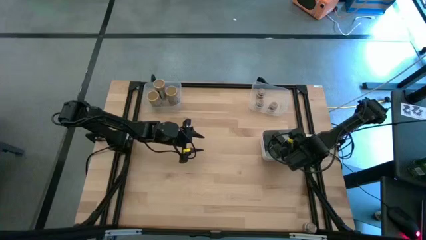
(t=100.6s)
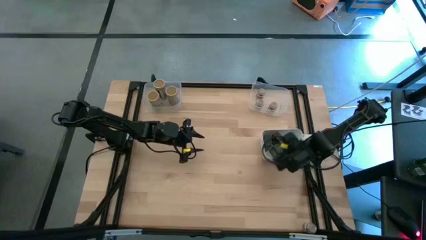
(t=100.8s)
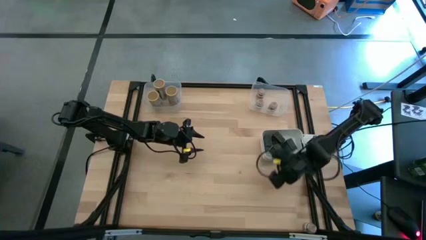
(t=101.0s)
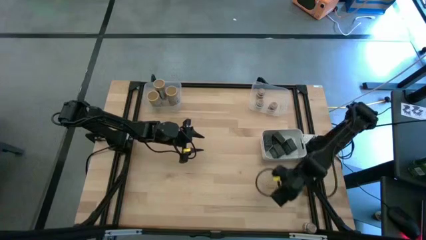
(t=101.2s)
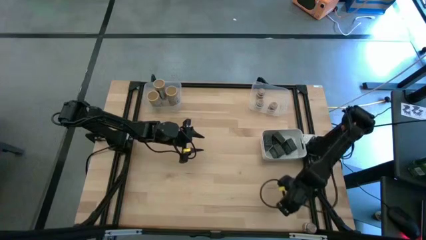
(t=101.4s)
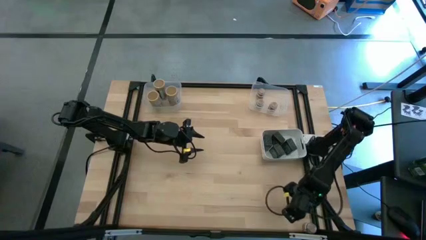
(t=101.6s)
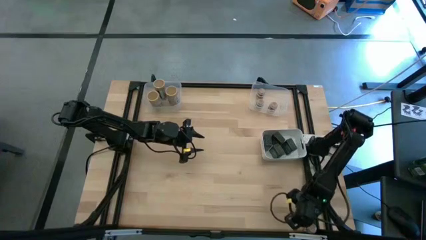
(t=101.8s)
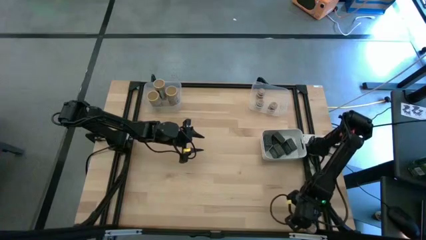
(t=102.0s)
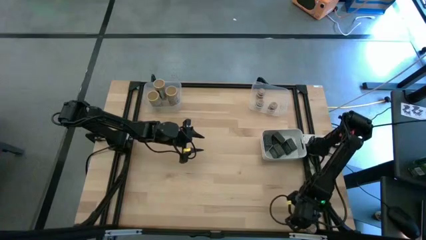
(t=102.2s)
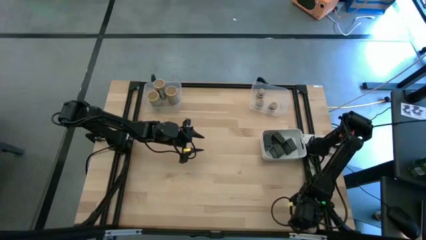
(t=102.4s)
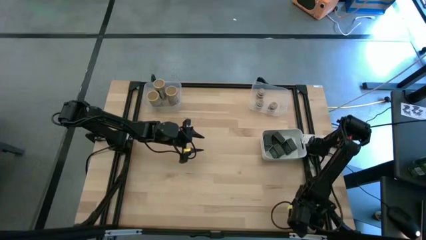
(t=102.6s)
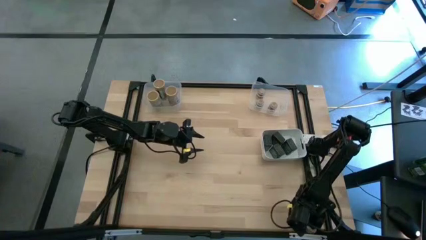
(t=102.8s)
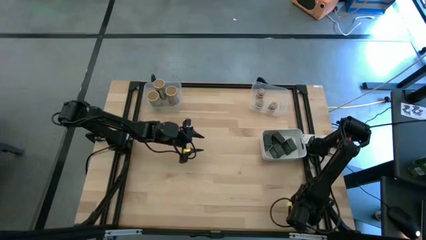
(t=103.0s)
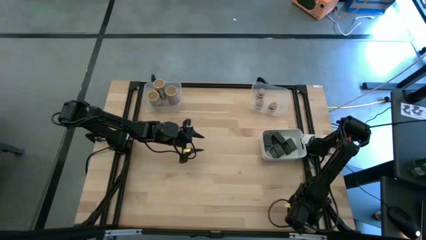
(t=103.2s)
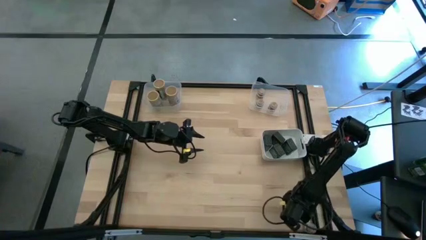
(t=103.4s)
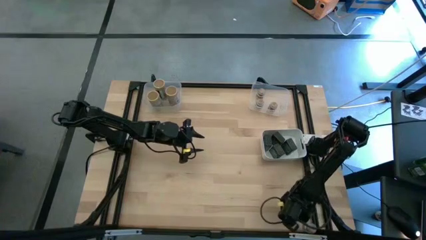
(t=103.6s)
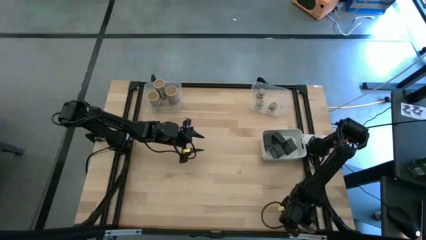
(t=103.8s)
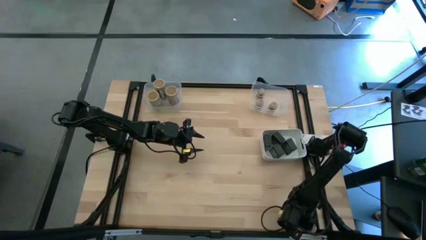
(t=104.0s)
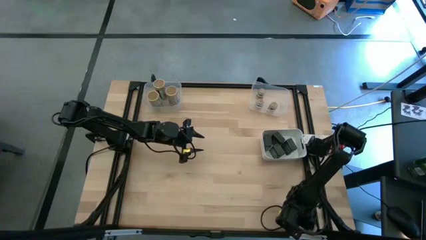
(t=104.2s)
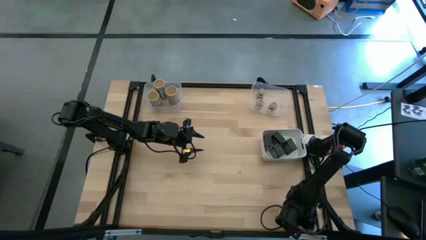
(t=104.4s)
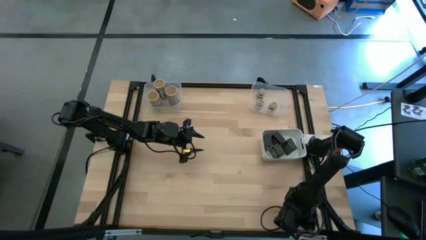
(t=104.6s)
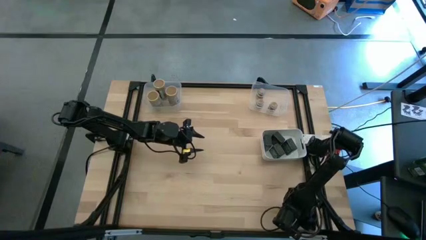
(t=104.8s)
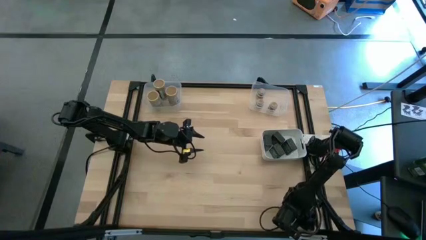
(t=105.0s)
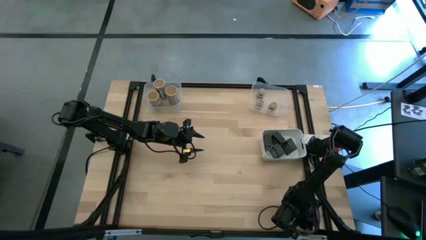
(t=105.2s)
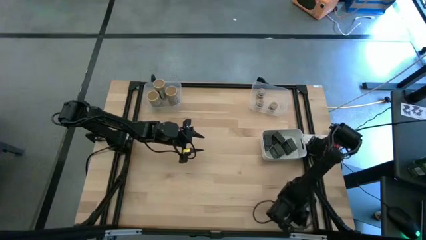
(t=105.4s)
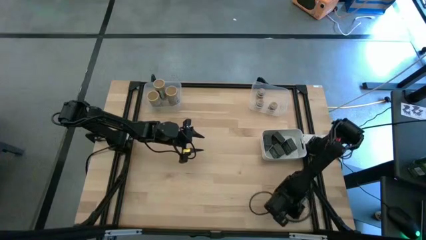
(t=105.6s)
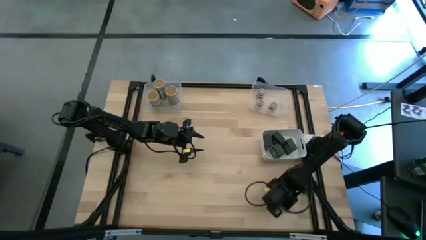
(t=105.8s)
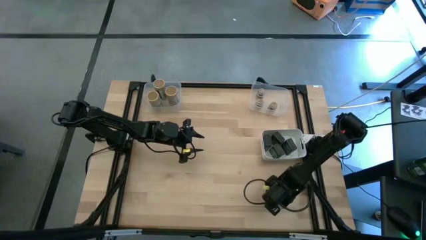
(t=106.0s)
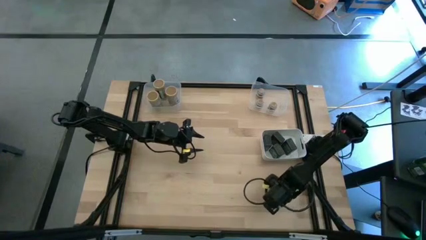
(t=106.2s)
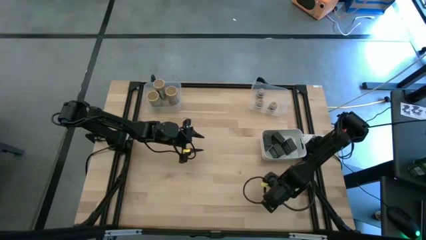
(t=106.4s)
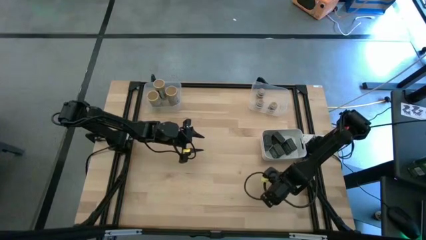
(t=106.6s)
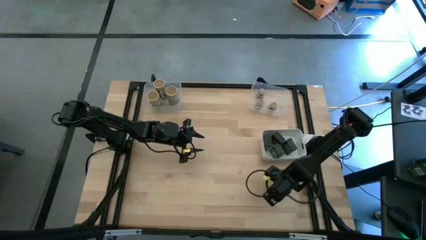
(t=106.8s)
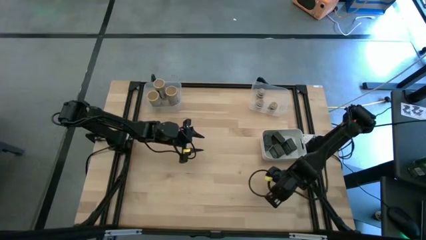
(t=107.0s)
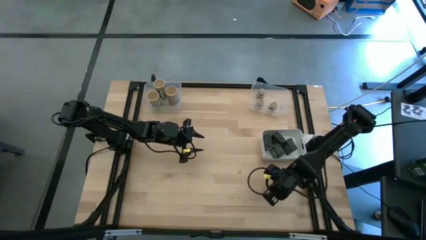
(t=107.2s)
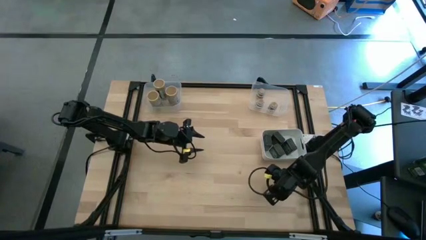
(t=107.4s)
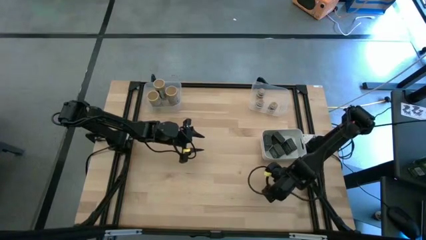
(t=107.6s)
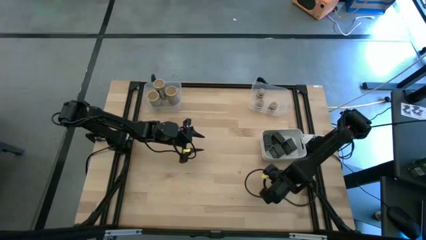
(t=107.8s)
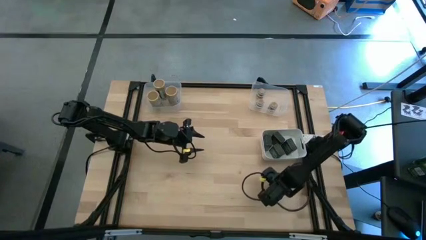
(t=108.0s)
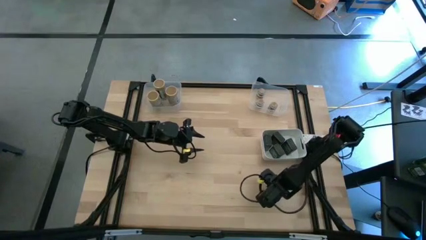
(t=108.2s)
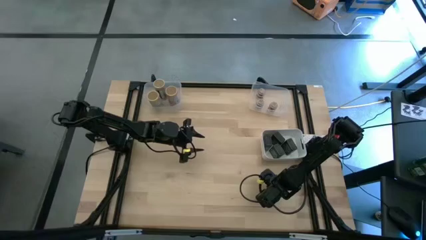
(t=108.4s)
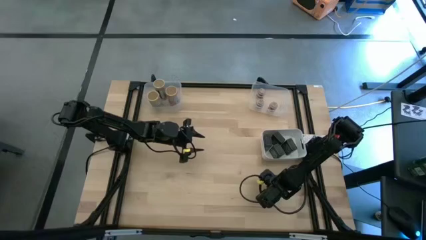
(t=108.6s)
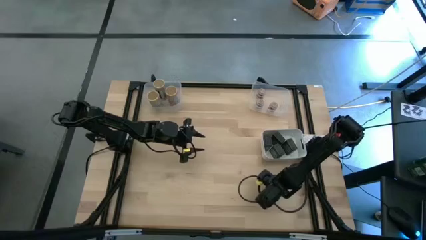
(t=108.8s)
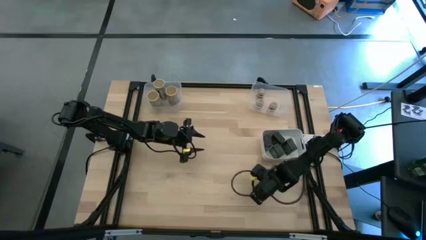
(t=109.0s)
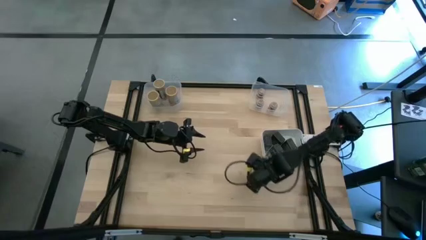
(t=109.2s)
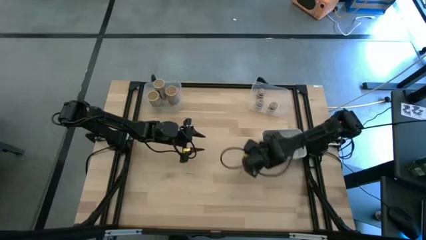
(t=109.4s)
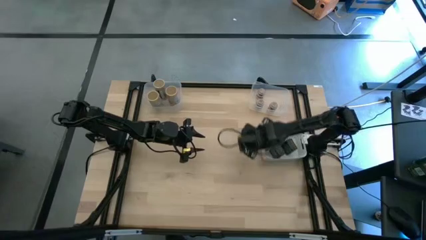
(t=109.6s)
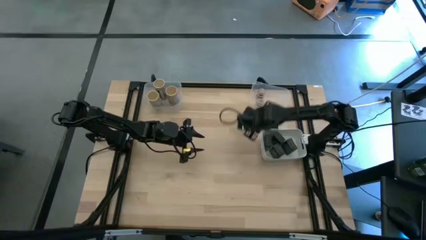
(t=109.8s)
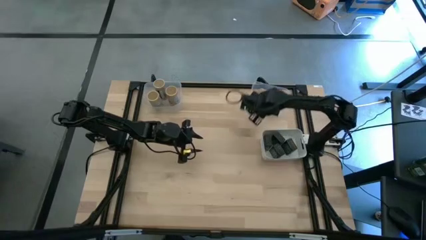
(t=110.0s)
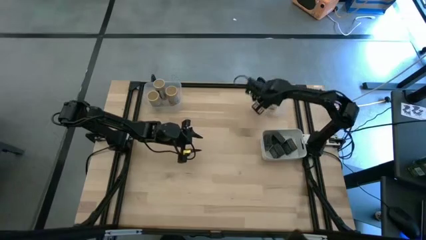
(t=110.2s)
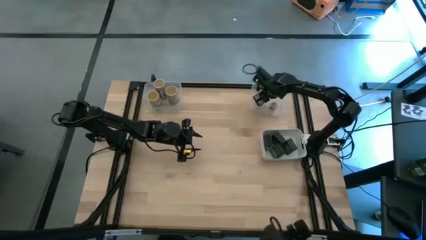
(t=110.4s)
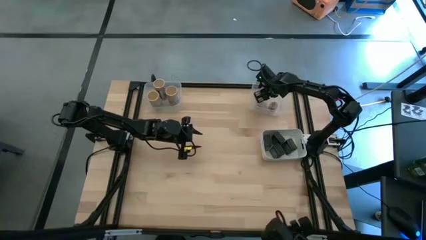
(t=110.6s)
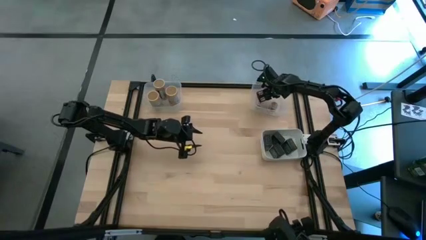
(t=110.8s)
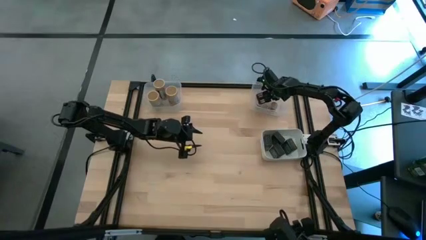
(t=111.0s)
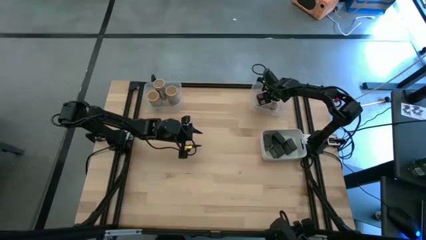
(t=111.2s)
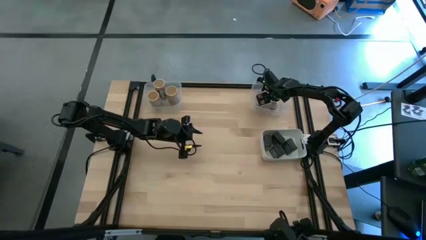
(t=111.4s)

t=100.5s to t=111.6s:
Task: Sort spices by type
Put the brown seasoning bottle into the right transparent bin

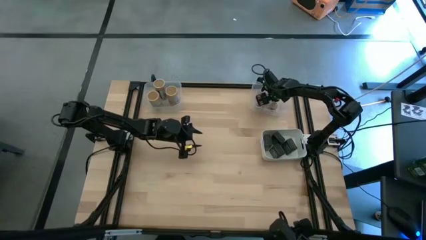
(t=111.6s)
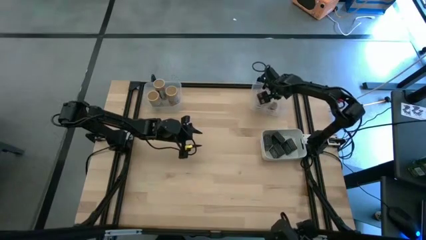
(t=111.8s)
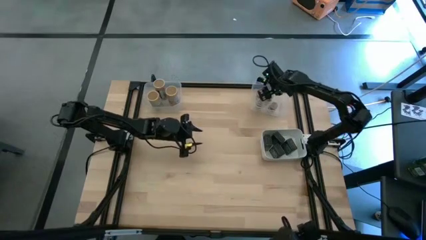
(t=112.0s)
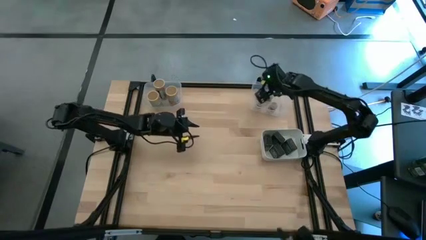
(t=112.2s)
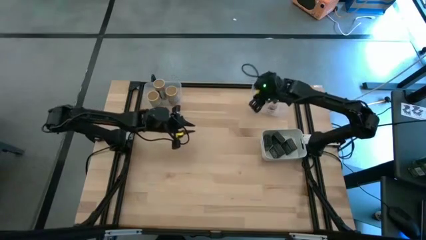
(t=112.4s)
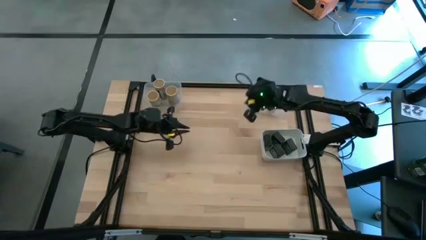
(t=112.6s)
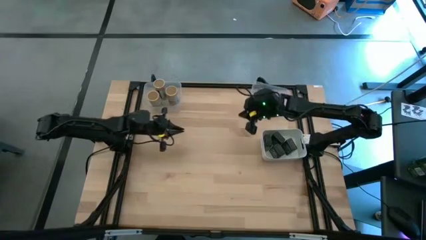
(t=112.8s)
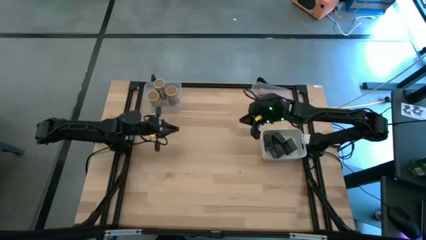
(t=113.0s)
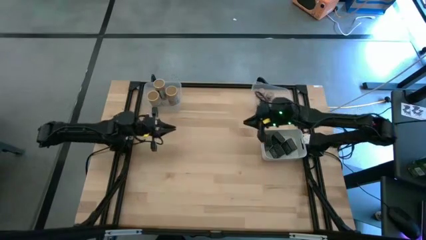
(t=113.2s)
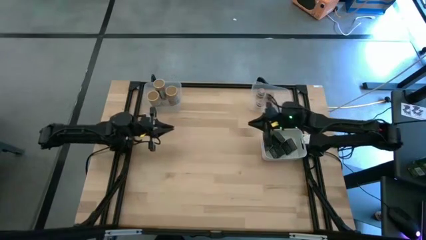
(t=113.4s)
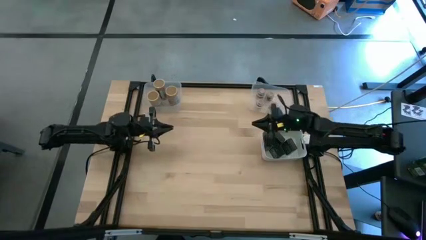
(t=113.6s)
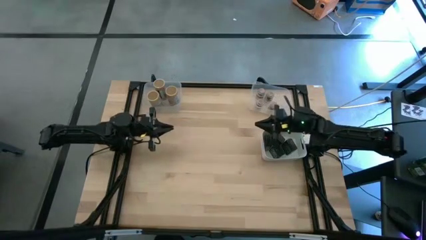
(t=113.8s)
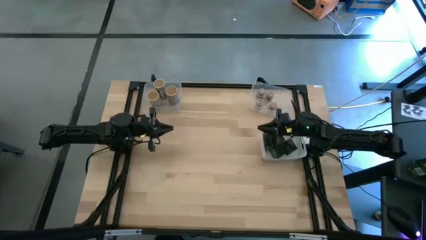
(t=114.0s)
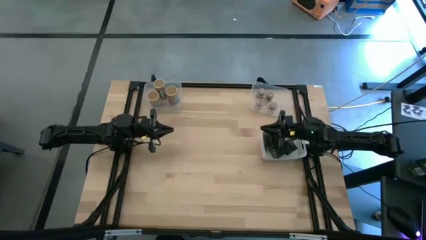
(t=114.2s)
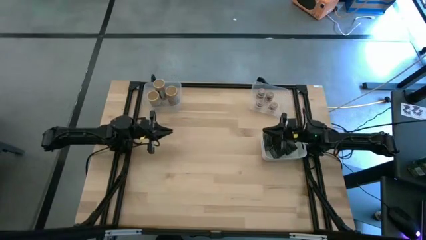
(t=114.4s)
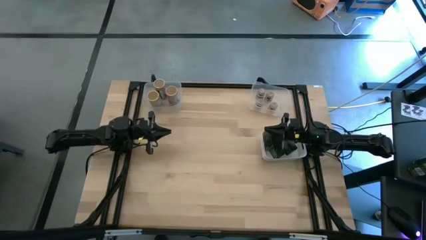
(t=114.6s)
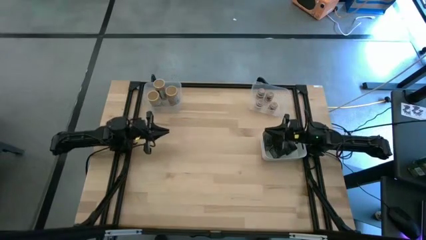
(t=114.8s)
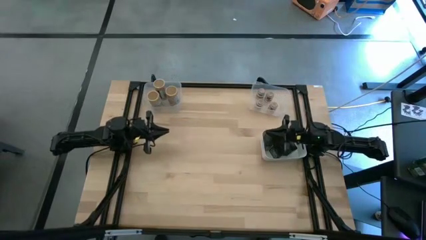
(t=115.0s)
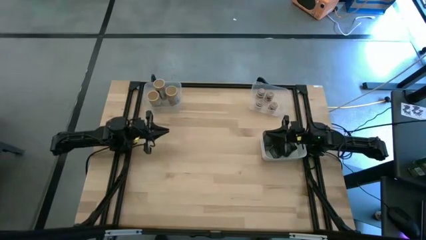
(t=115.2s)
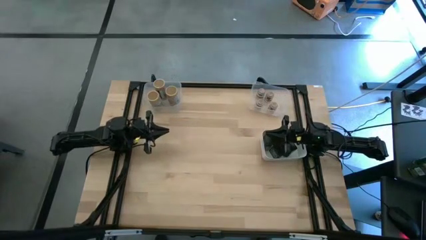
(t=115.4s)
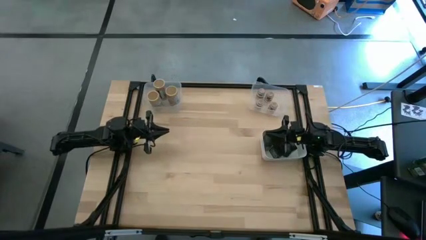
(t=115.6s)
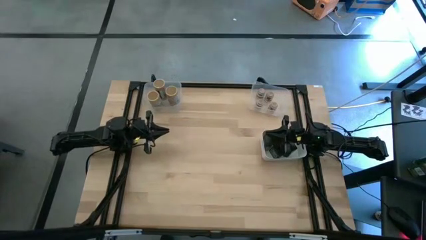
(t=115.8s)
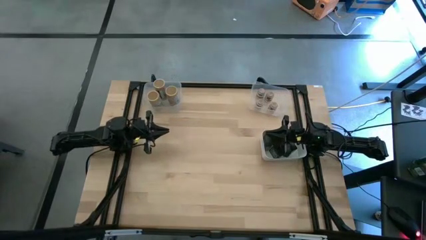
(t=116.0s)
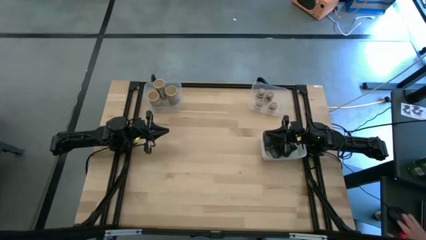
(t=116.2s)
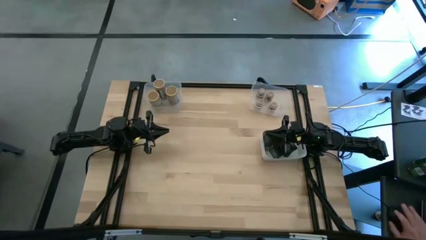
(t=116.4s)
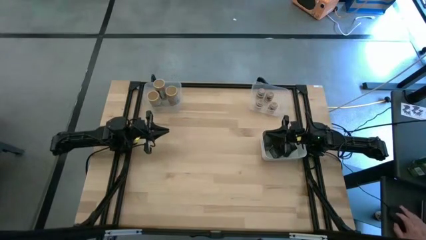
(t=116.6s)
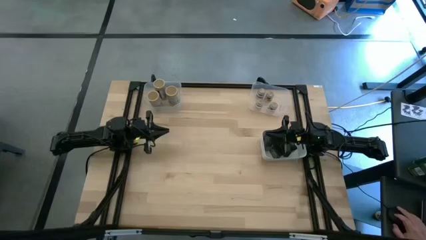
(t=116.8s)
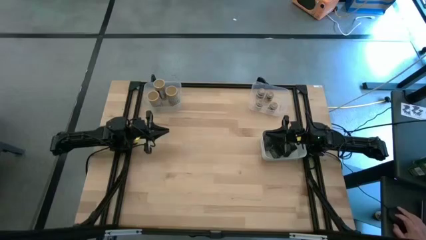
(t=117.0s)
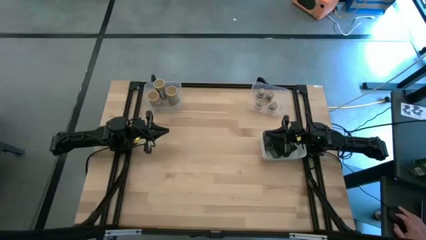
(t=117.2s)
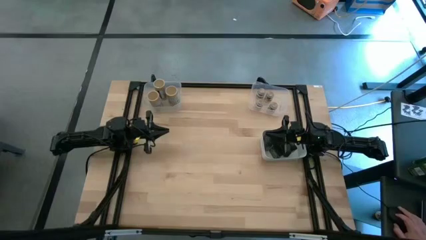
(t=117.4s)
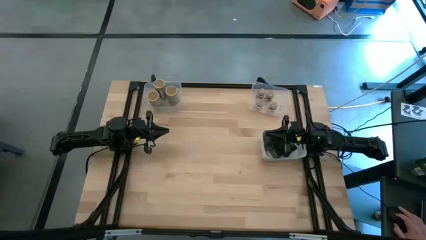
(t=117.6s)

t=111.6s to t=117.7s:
Return to Home Position
